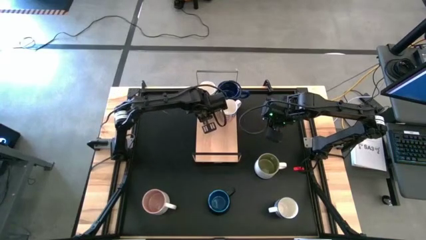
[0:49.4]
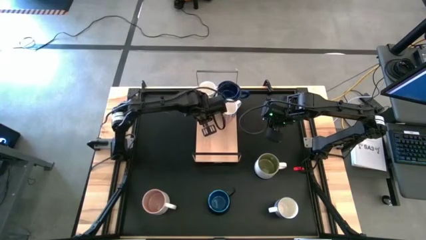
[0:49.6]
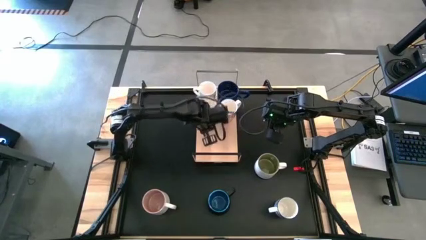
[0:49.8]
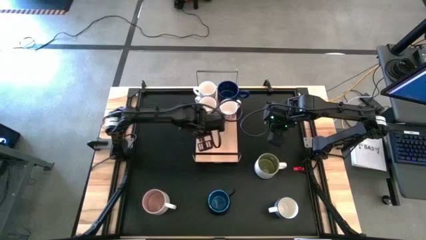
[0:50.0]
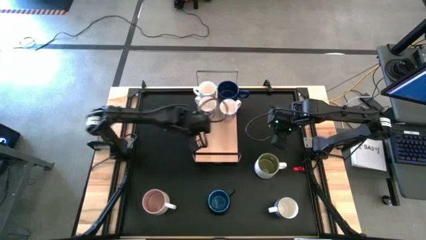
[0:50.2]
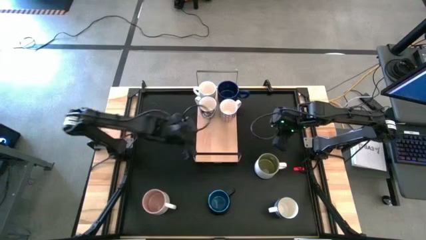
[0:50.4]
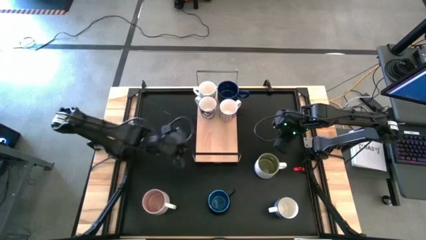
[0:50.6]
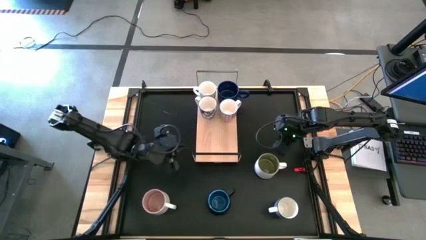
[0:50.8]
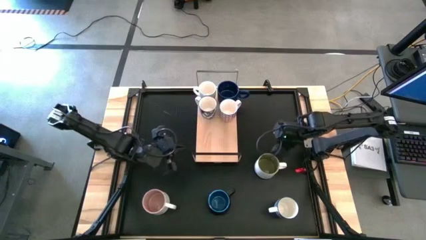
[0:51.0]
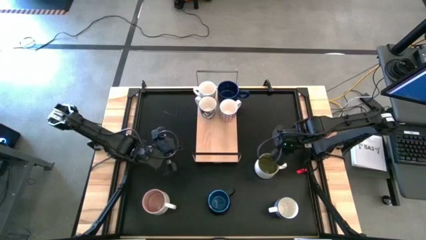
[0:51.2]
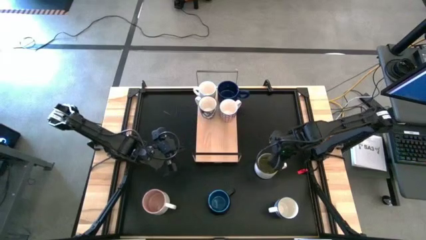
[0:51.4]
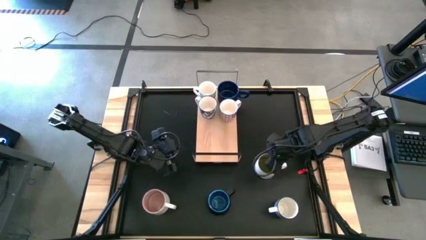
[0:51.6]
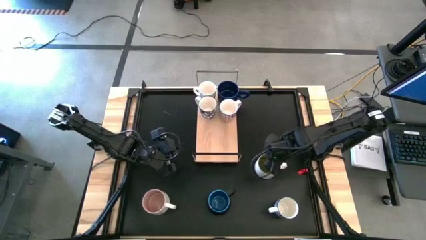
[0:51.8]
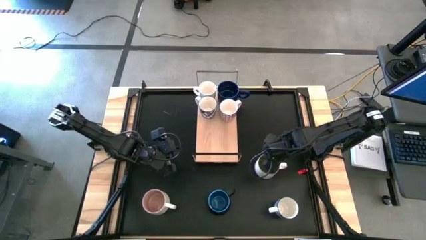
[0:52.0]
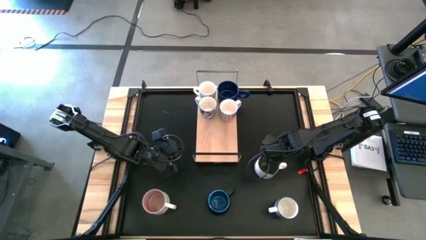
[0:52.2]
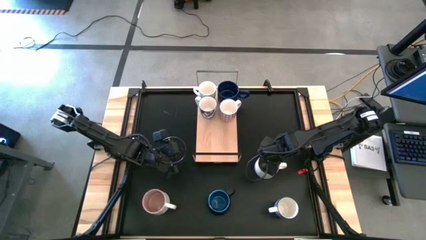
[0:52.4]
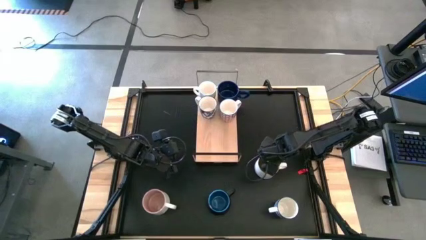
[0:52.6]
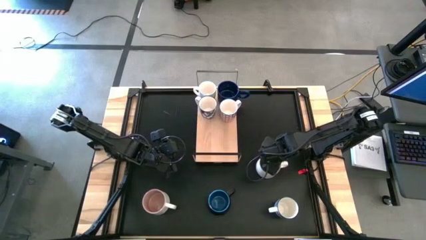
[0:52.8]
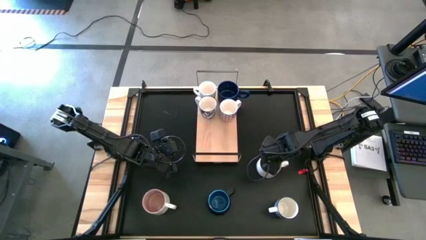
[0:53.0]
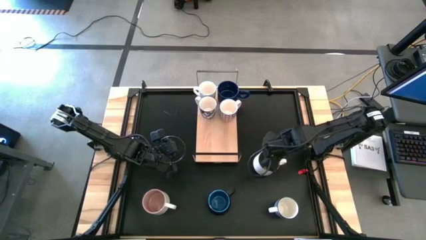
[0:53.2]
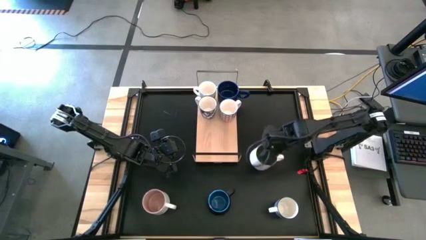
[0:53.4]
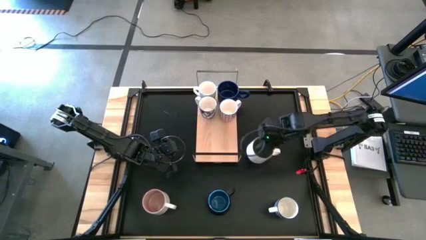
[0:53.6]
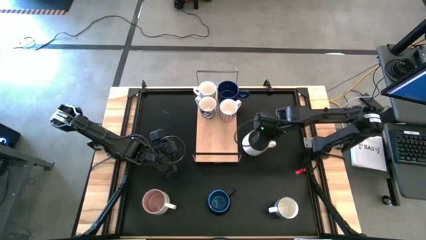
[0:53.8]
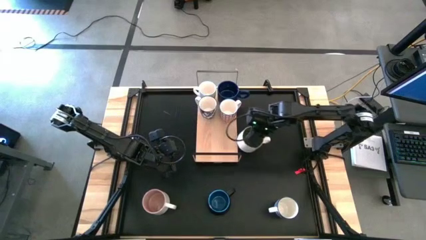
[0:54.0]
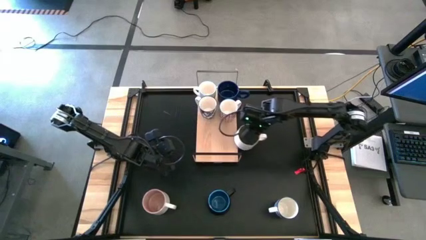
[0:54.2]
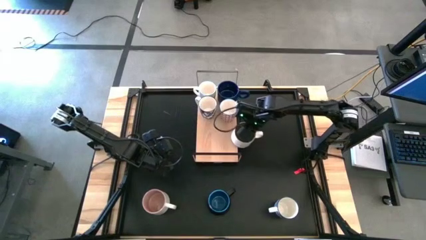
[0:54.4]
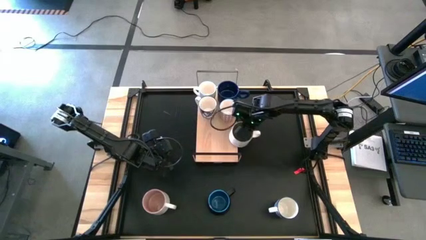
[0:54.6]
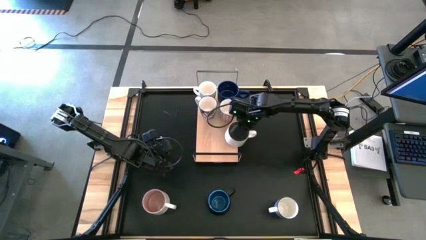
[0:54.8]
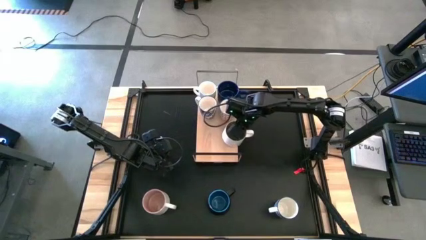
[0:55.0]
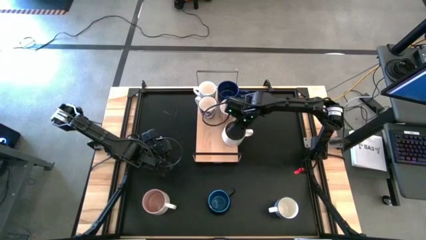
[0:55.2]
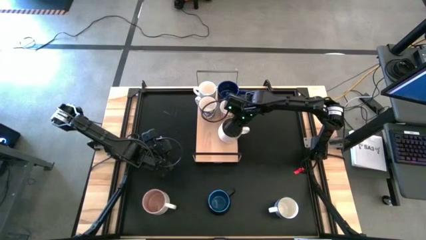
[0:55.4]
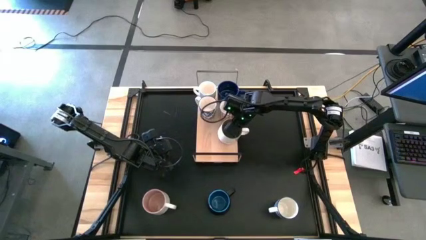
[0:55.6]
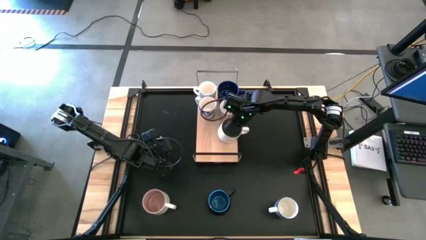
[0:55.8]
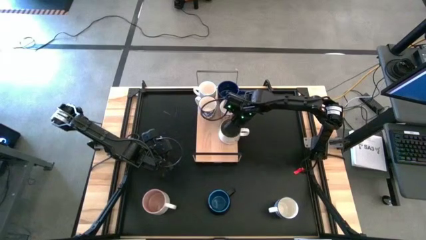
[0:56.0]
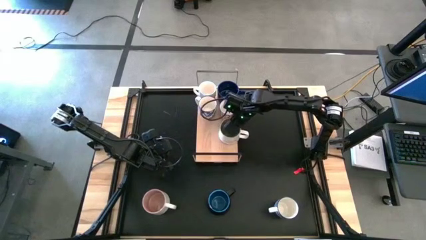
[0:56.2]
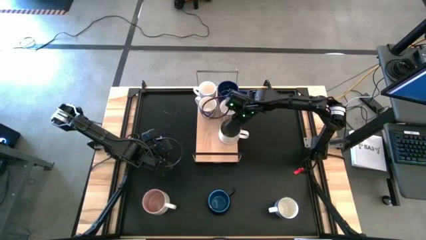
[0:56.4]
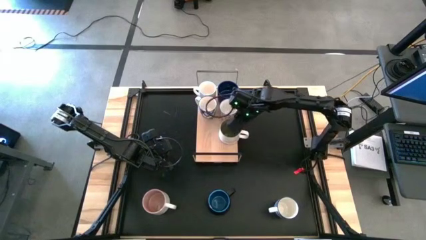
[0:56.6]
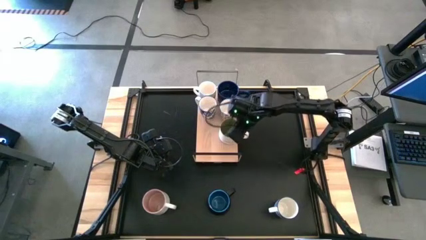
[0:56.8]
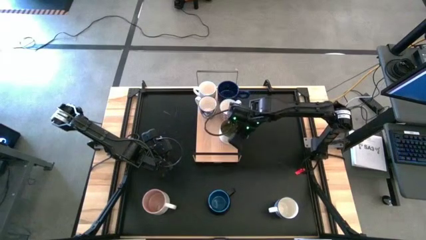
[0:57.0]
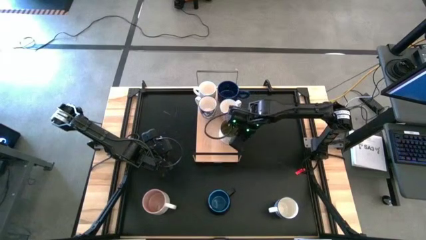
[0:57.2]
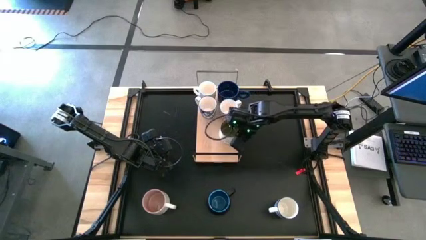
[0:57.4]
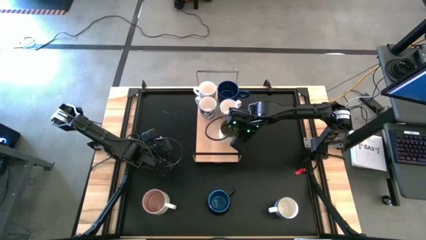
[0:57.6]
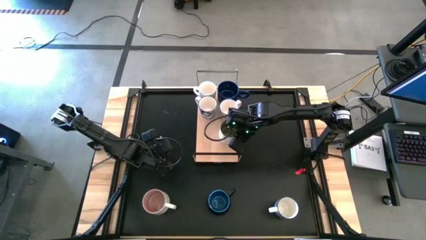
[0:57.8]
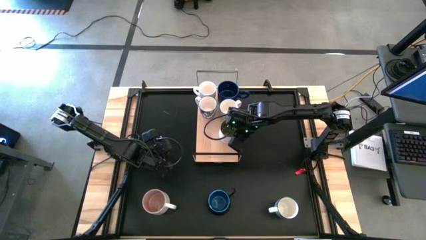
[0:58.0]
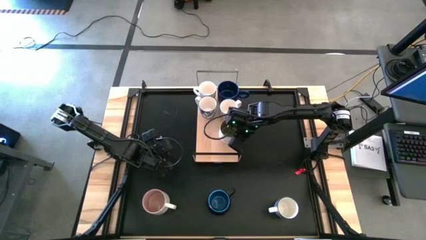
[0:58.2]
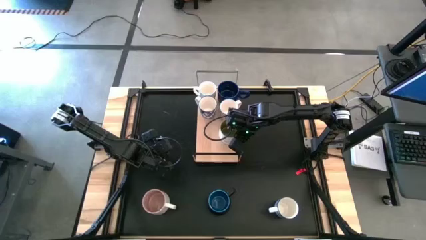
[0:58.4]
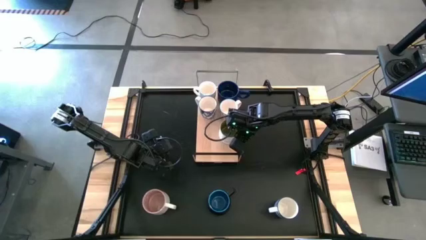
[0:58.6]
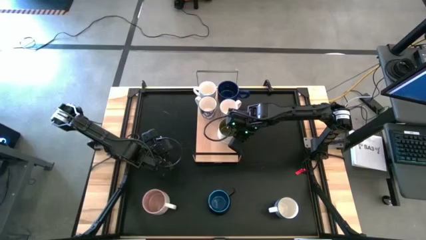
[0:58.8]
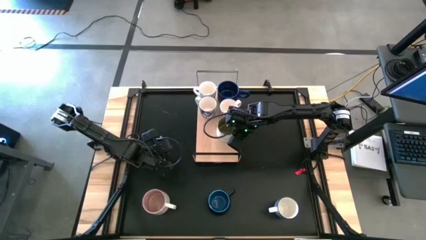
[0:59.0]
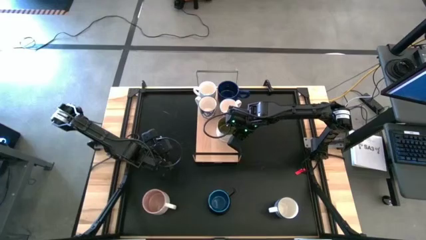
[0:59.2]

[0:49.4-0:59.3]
Task: Place coffee mugs
Put the white mug on the shelf

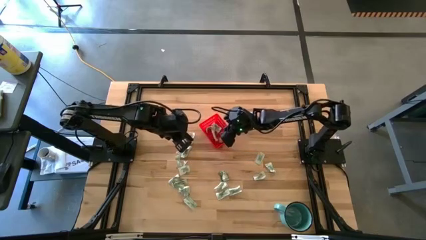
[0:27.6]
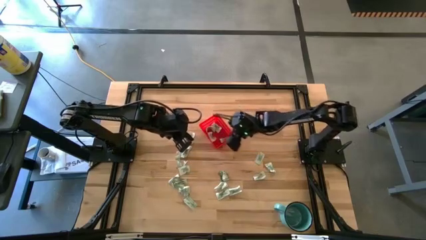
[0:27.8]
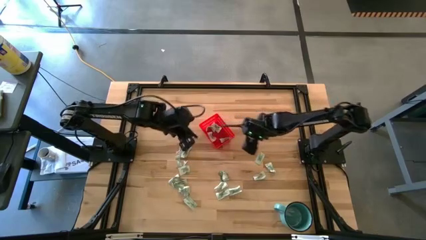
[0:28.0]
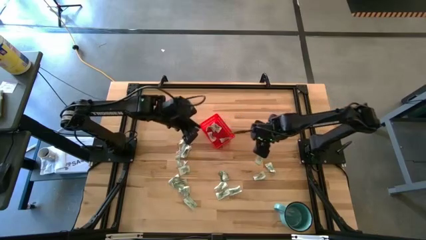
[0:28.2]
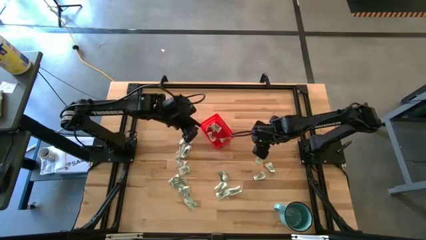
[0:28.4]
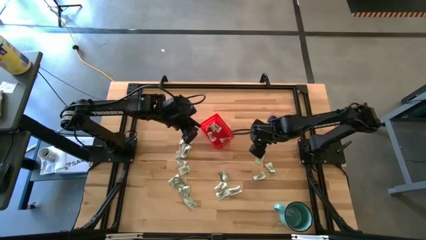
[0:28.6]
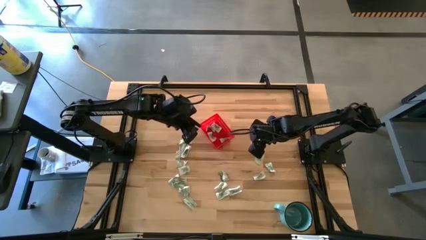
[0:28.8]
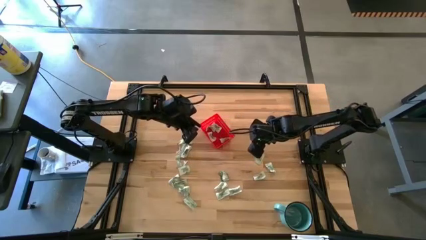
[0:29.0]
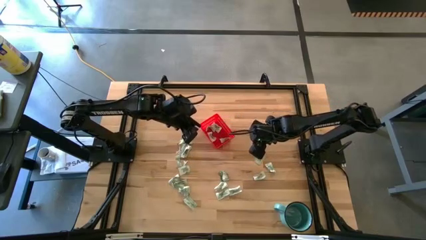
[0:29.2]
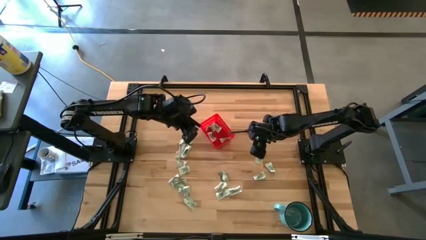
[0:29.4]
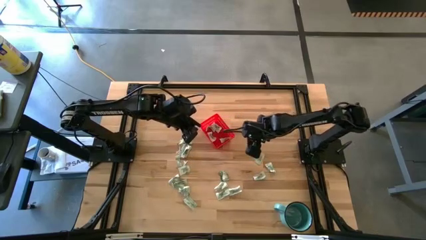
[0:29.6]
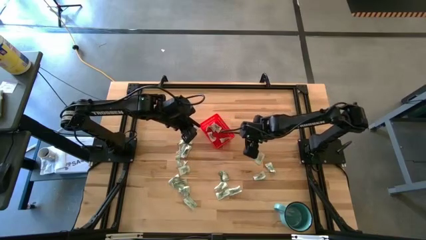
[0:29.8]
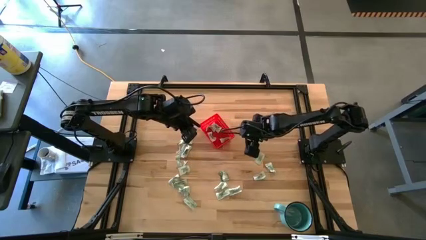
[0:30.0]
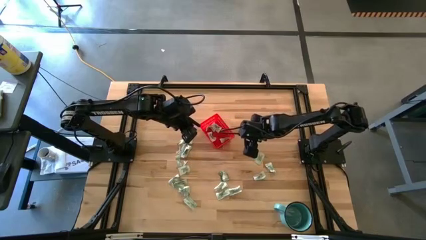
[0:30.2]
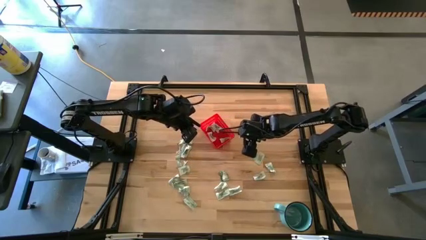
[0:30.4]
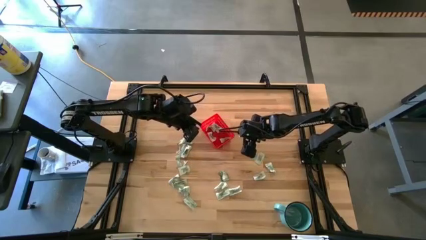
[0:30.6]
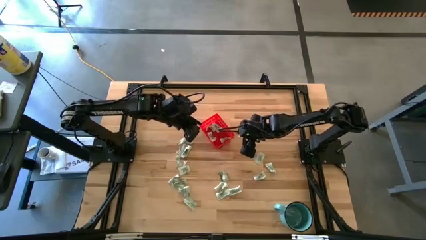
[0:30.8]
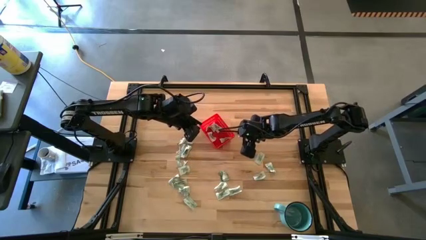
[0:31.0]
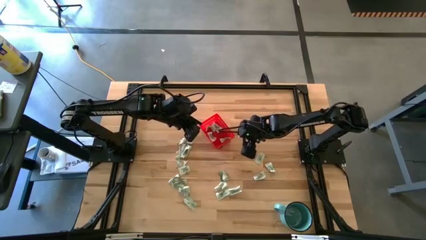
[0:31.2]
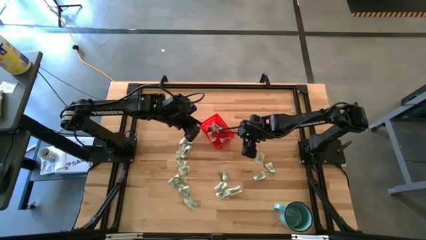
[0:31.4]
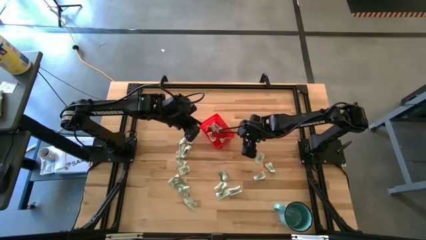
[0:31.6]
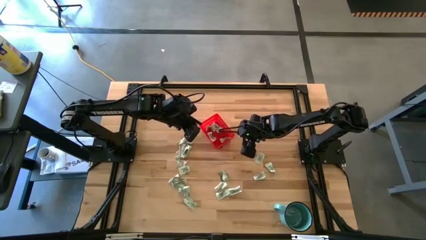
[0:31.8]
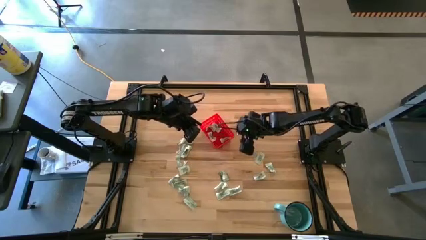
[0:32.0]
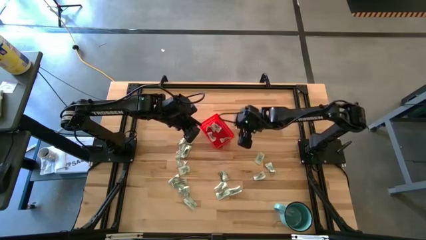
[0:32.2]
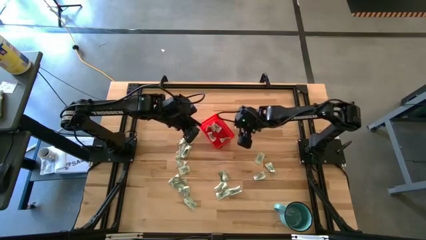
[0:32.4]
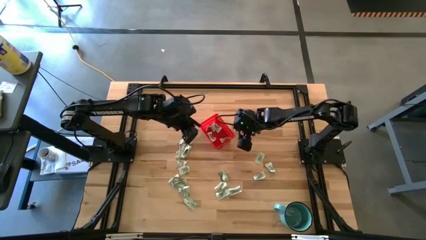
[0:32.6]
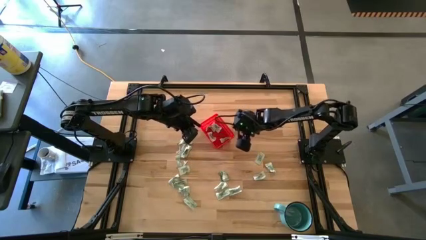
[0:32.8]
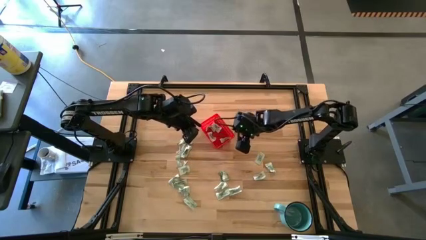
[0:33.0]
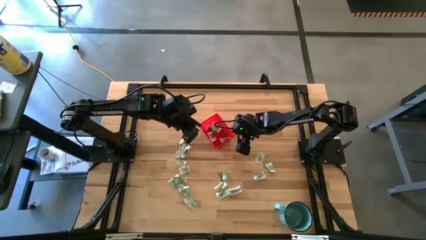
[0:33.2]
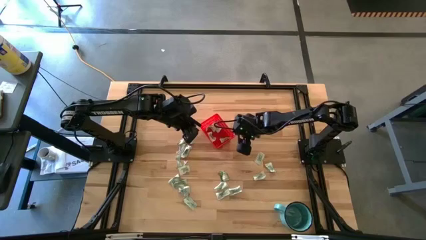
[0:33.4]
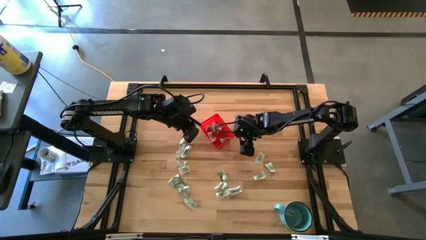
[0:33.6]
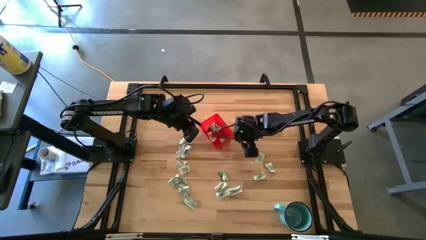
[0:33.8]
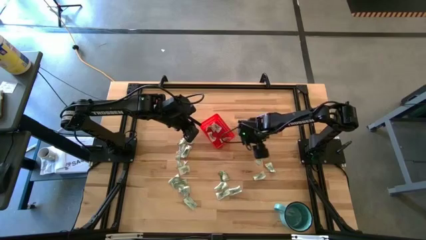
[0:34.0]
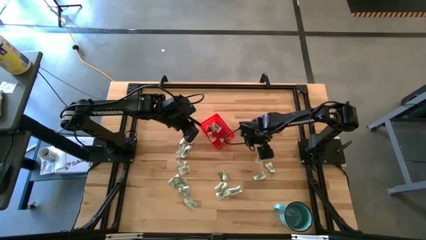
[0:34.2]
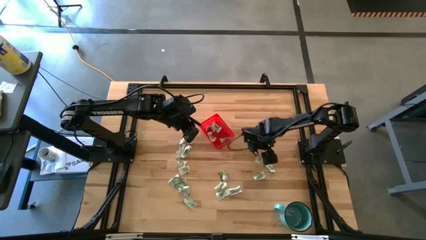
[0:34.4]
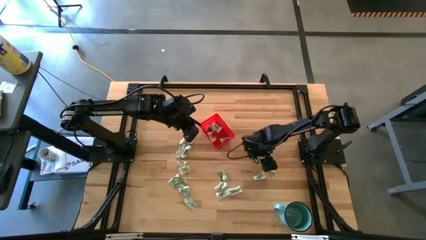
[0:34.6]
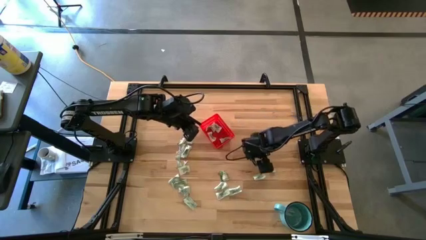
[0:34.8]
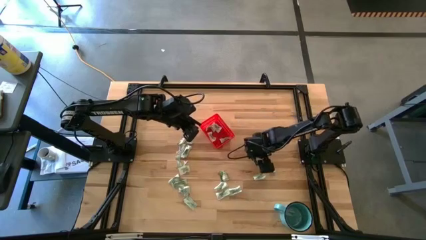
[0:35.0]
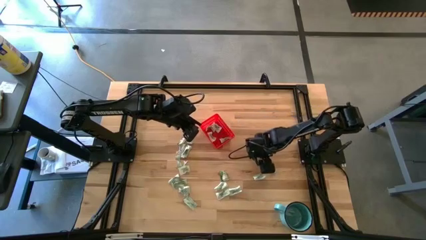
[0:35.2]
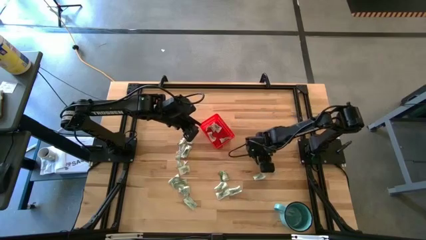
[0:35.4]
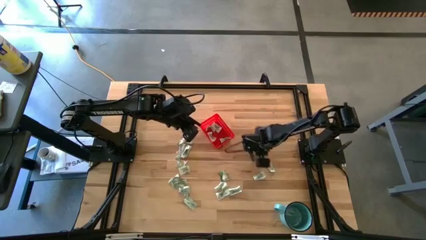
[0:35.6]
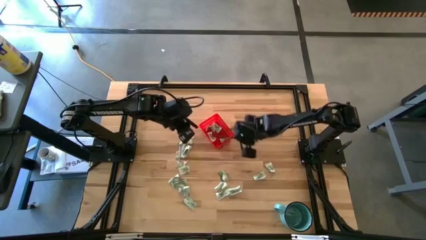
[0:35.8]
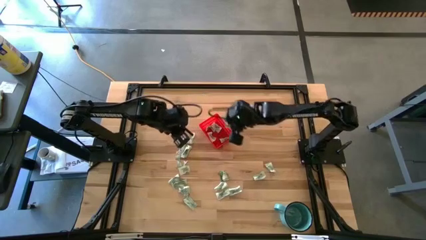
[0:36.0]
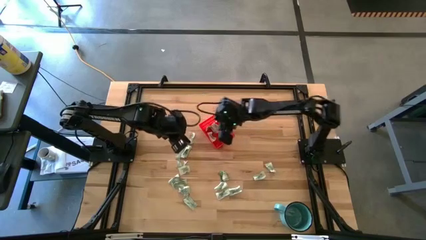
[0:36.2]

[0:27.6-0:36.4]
Task: Pick and place Stevia / Truvia into bins
Put the stevia packet into the red basket
